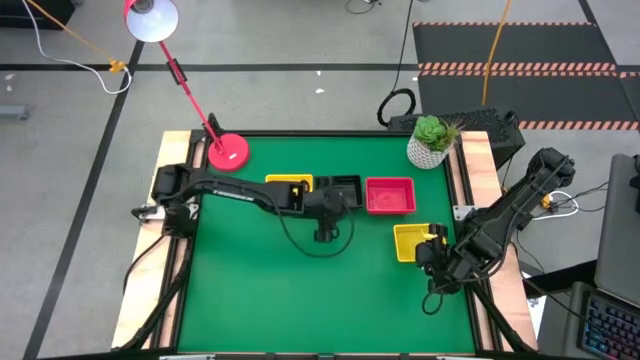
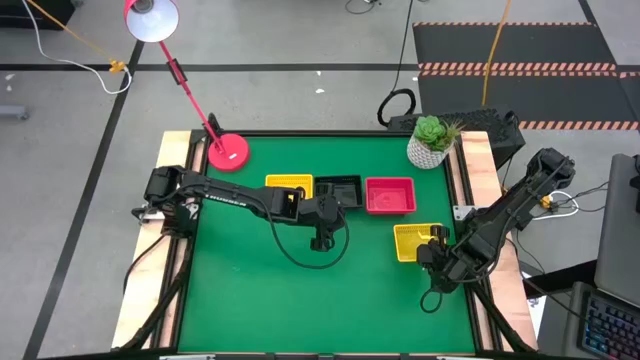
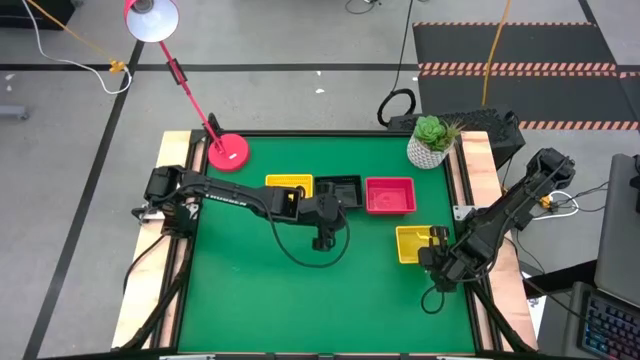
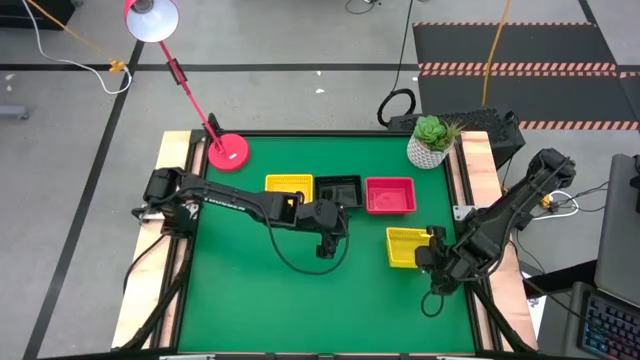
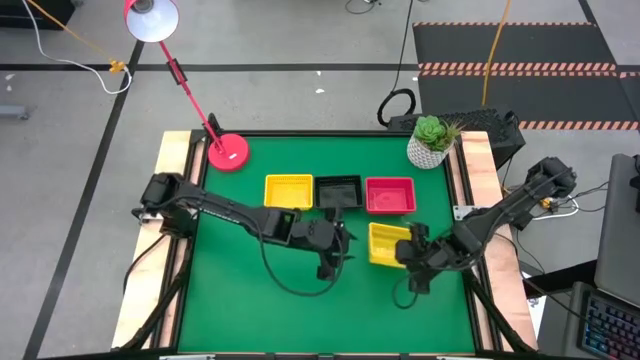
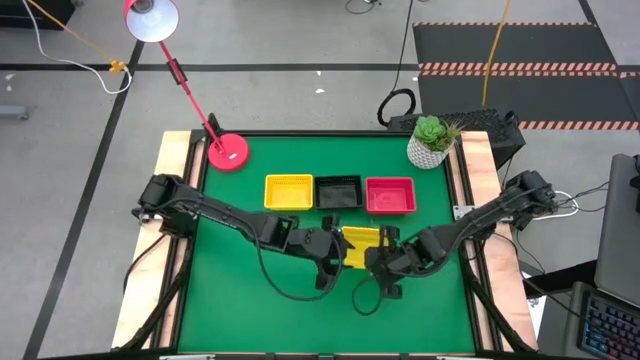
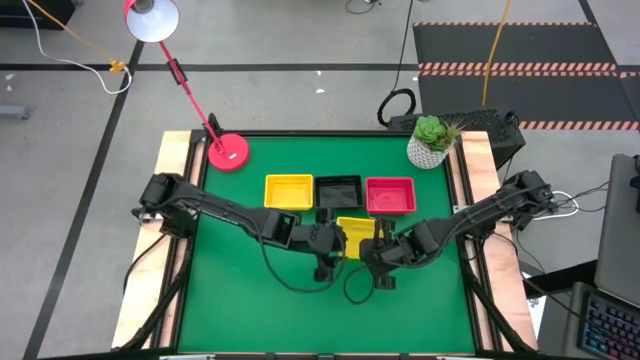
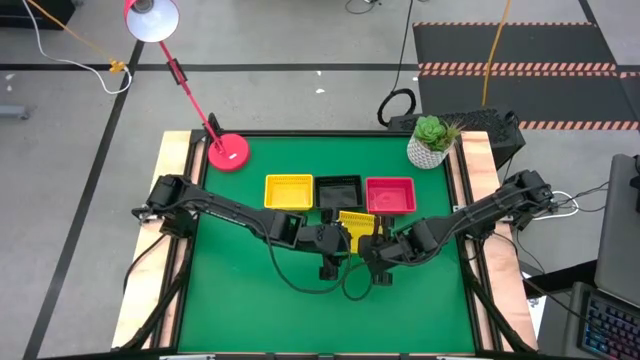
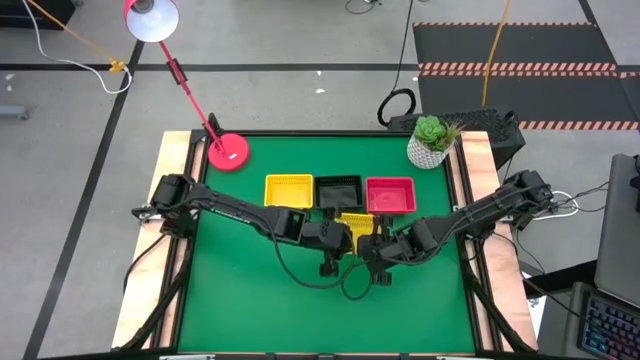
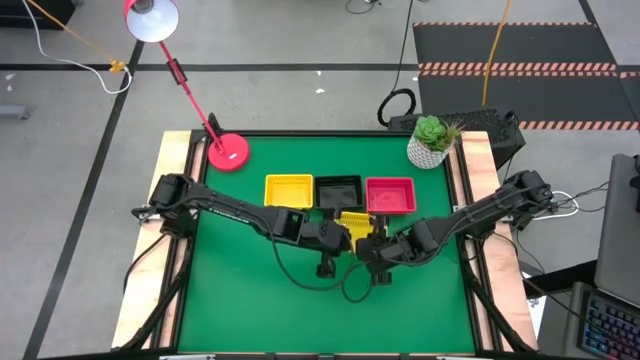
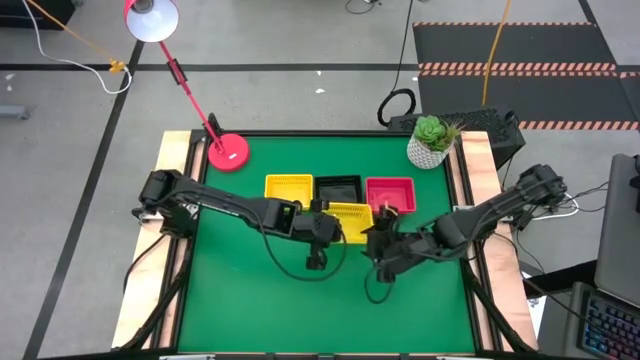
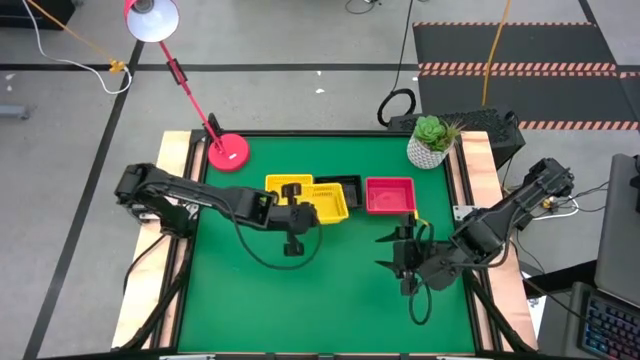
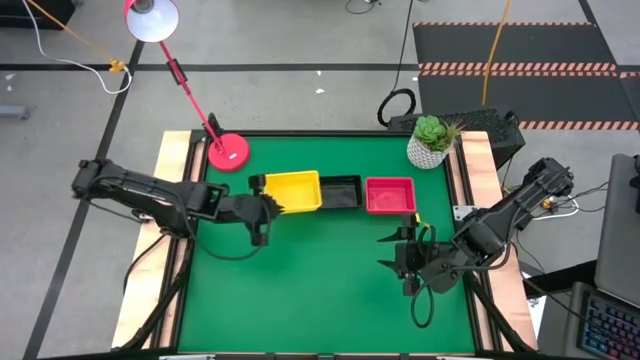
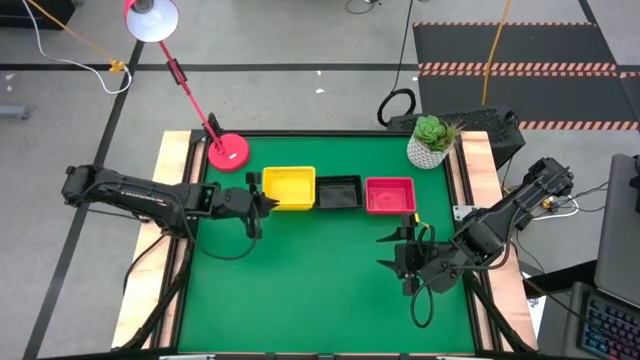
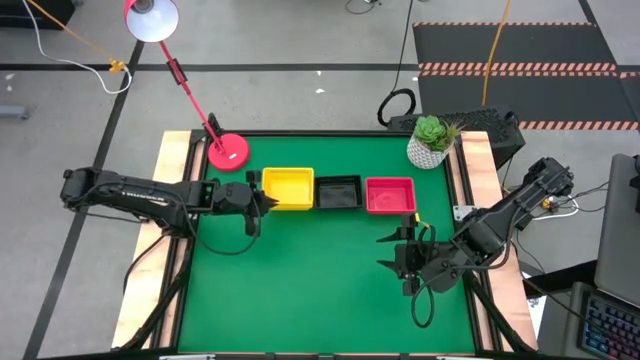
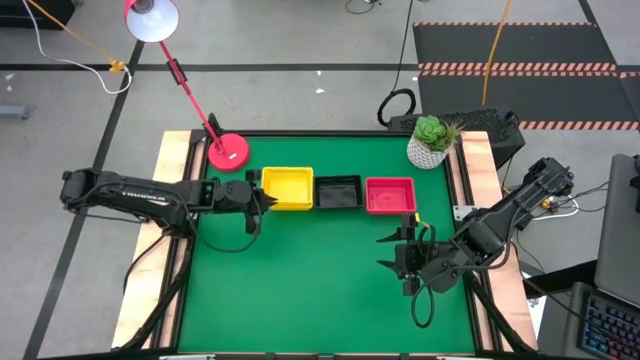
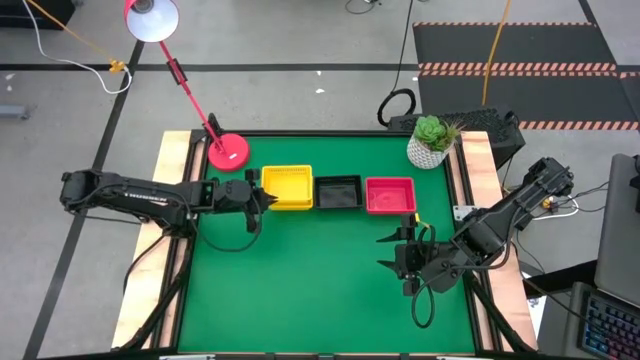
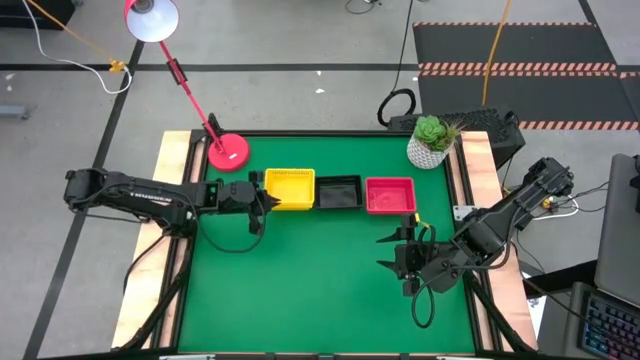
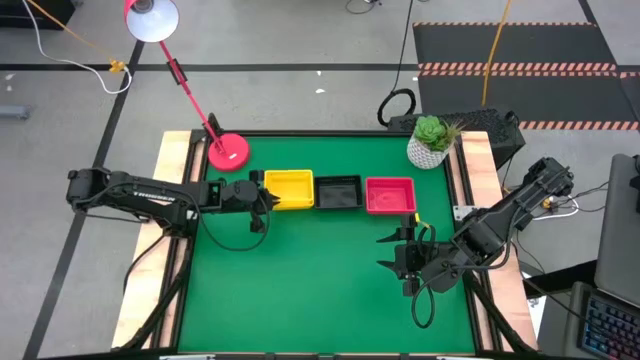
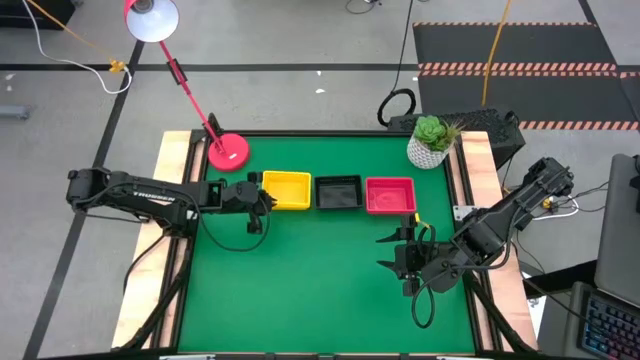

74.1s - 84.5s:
Stack the bottom yellow bin on top of the top yellow bin

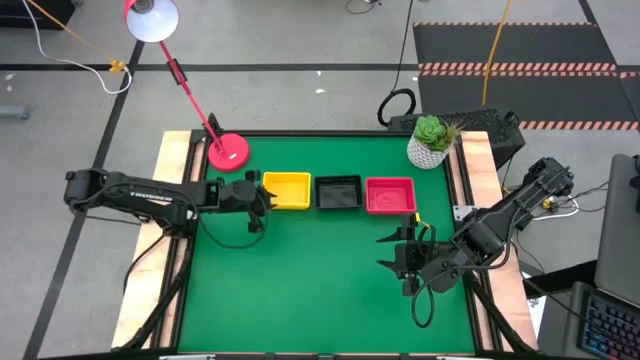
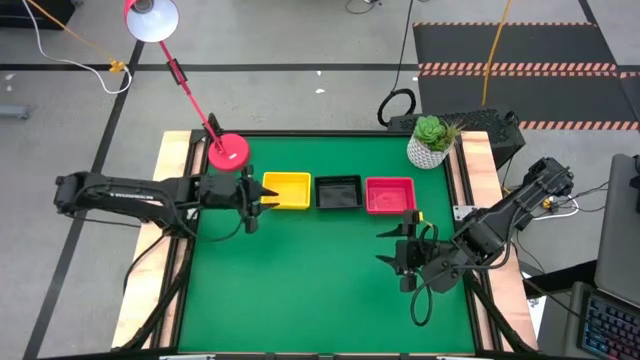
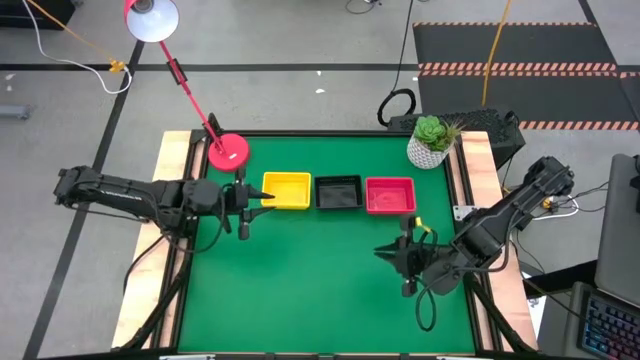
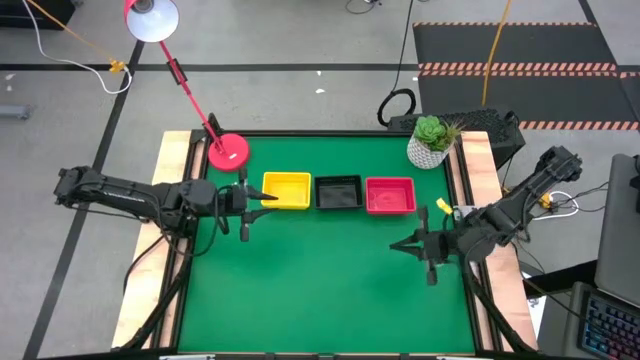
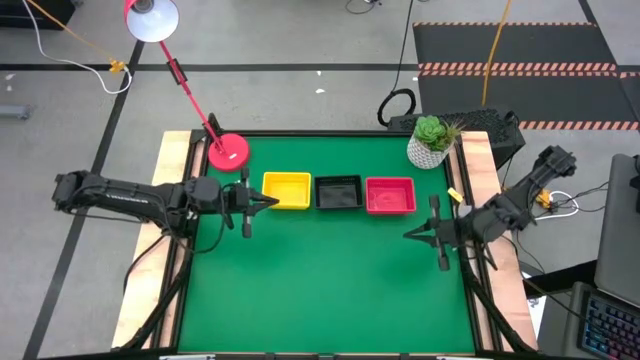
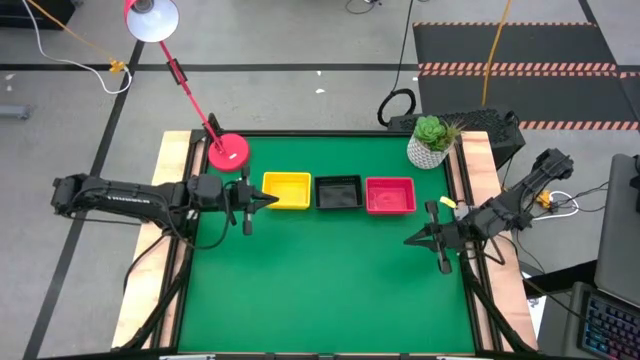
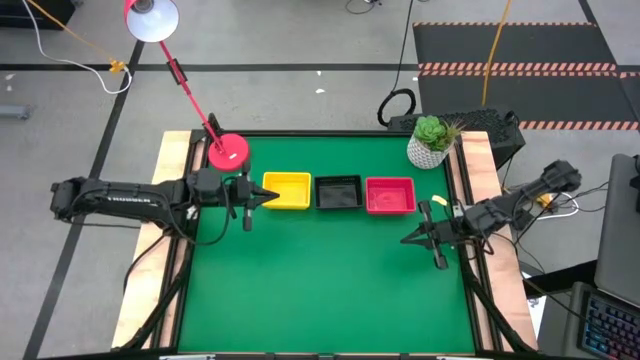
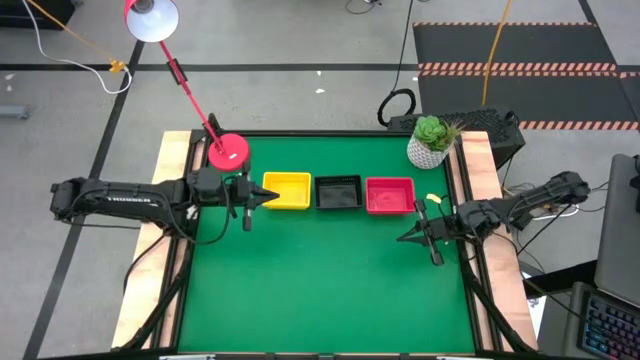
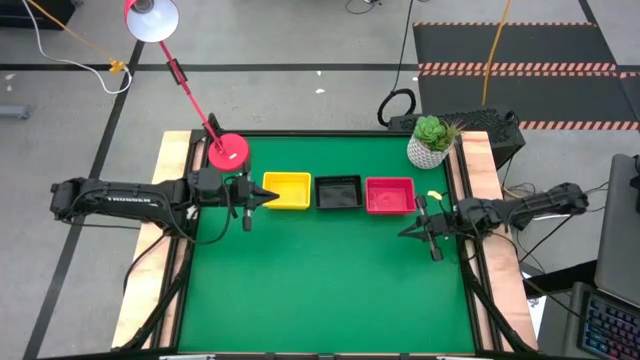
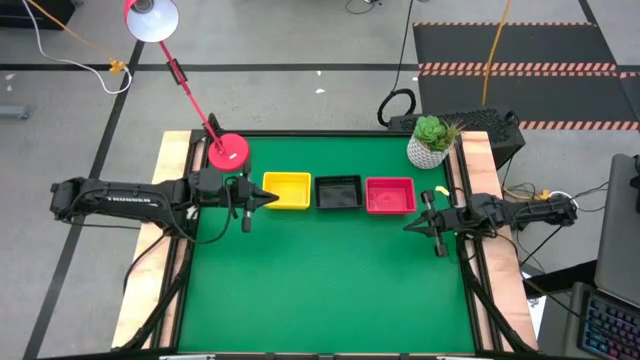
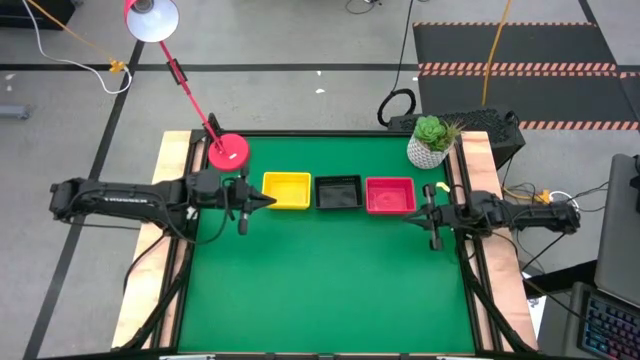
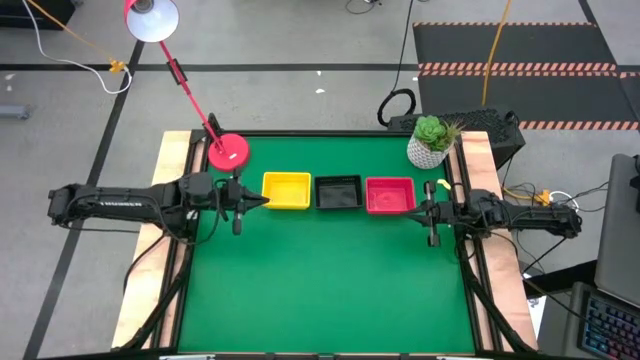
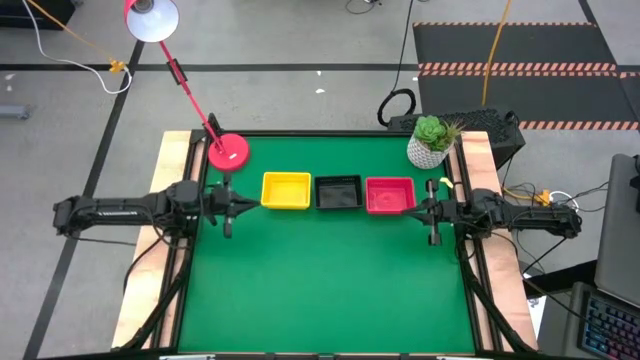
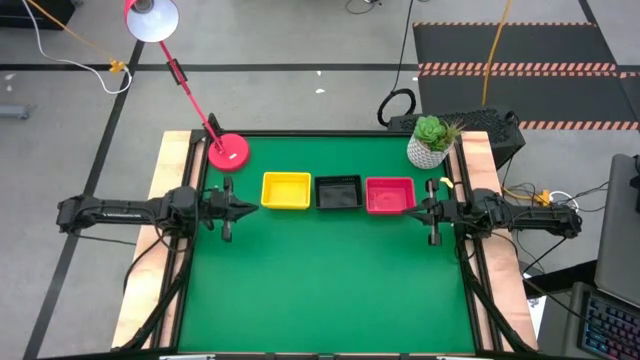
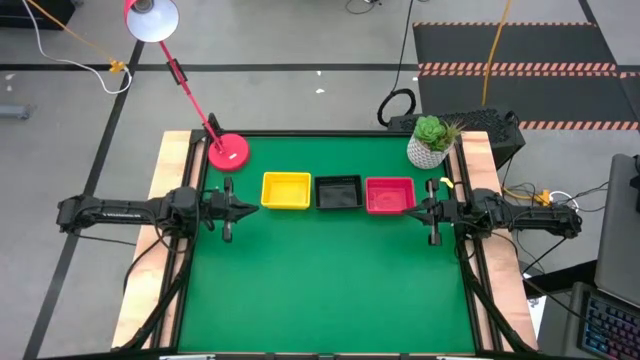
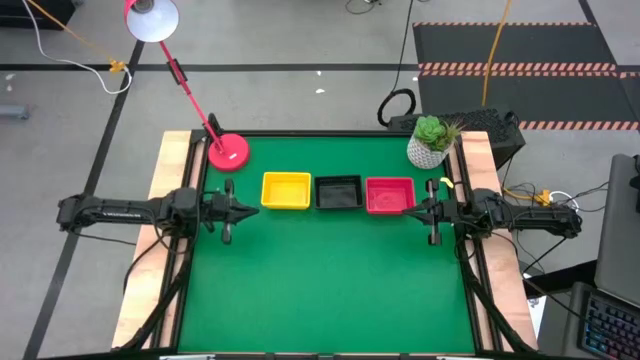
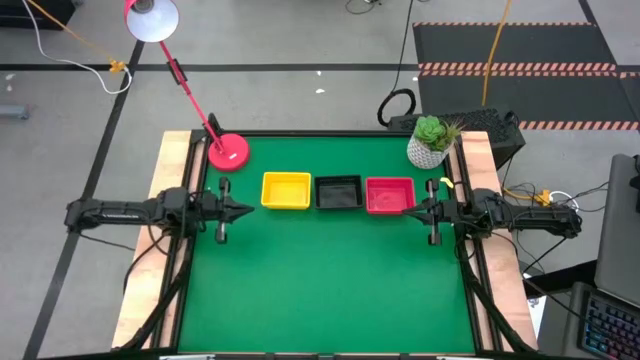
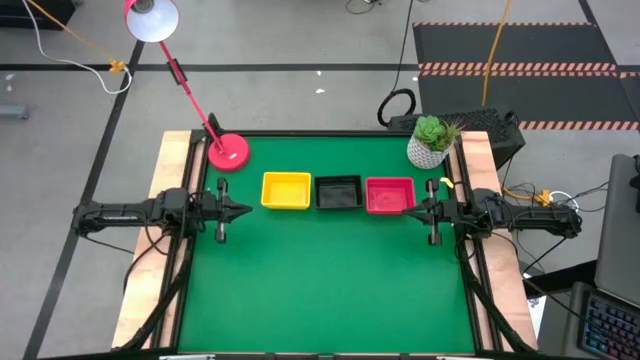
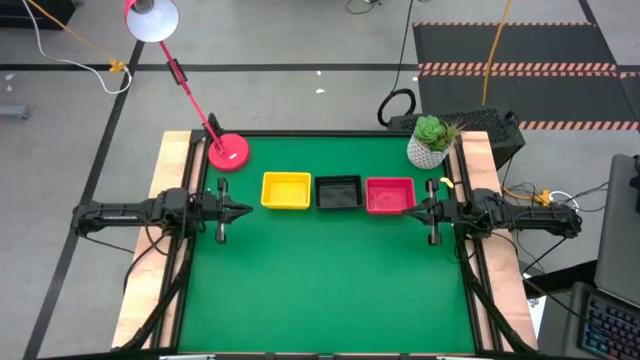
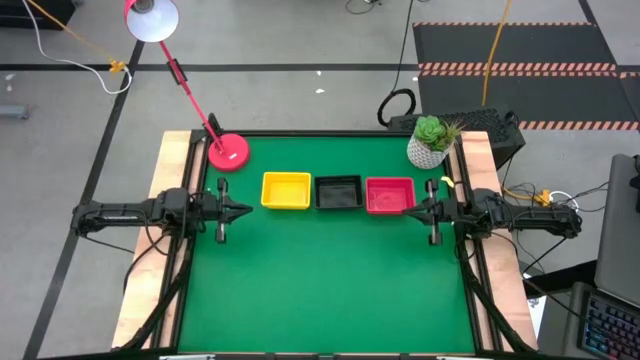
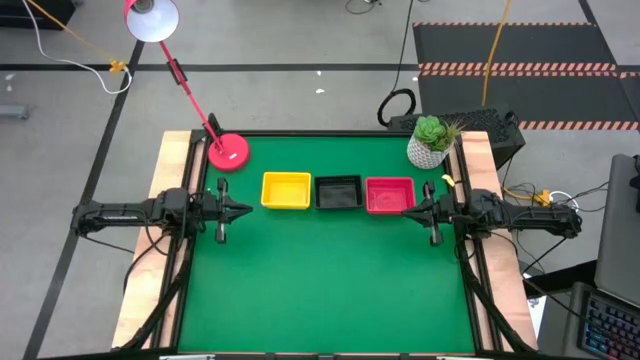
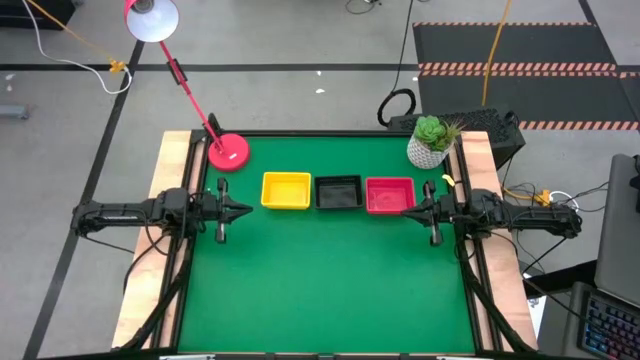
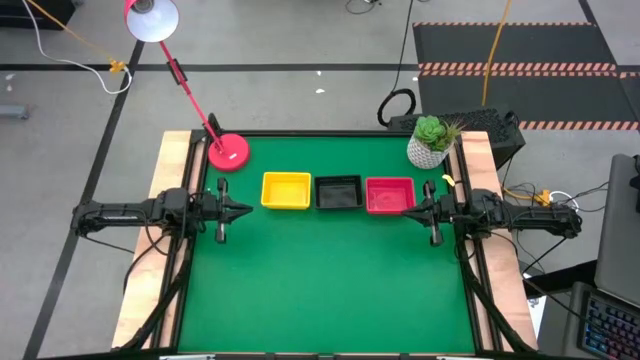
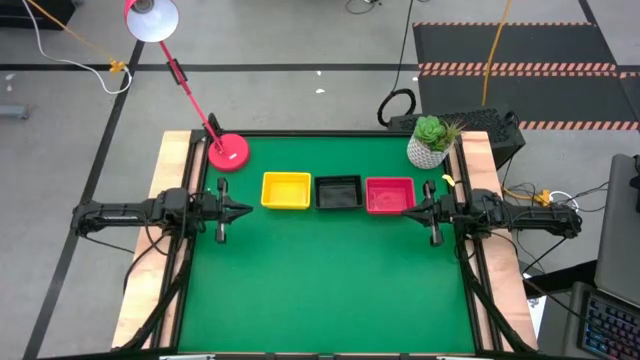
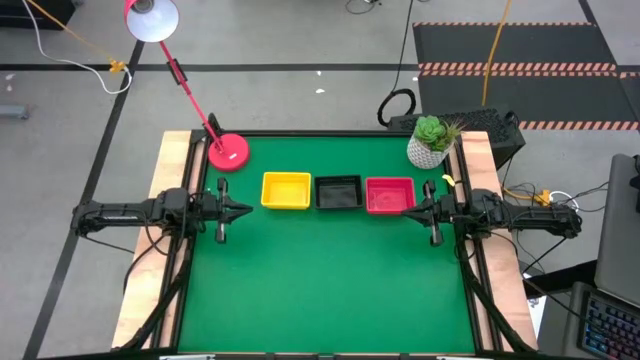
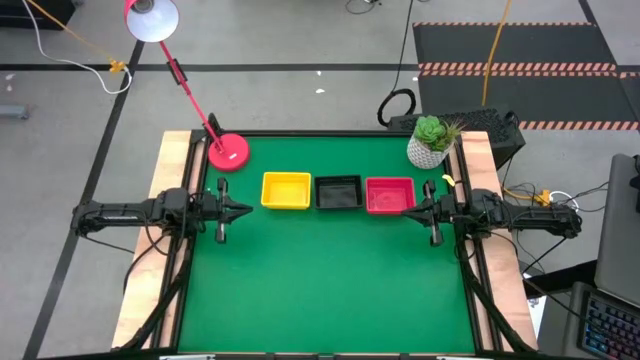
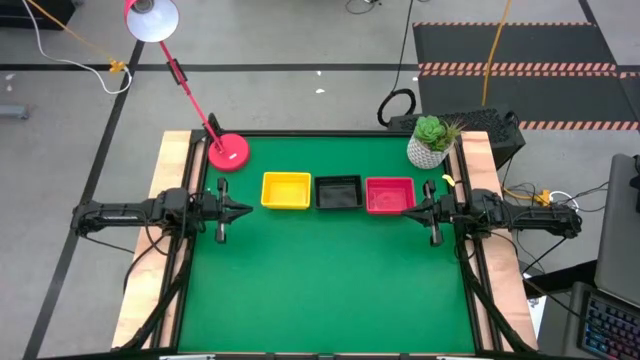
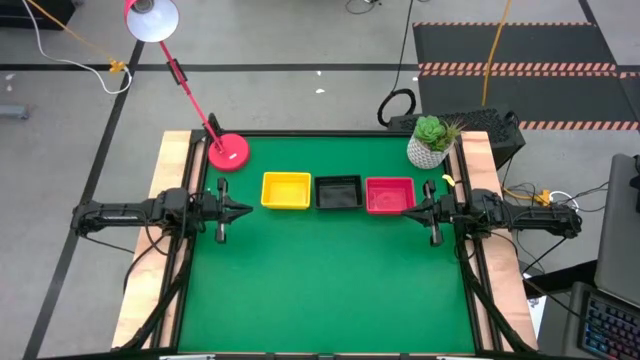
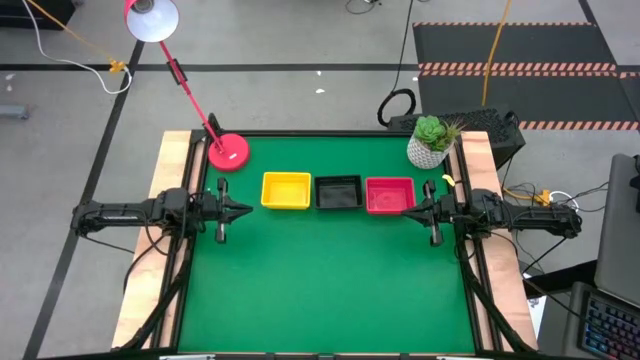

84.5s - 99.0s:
Return to Home Position
